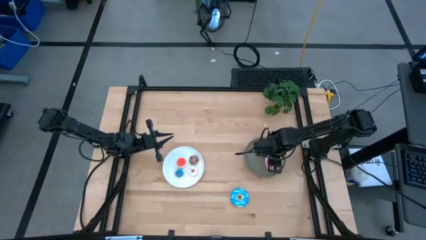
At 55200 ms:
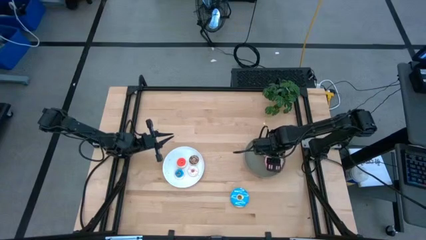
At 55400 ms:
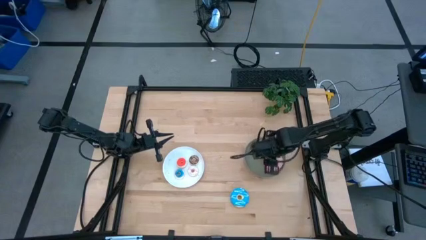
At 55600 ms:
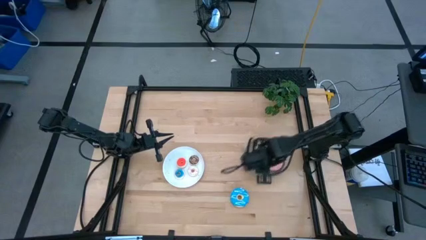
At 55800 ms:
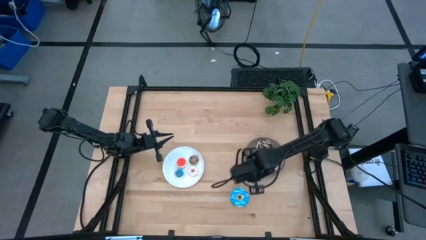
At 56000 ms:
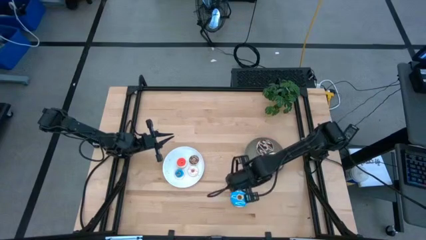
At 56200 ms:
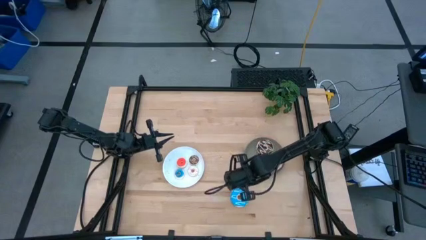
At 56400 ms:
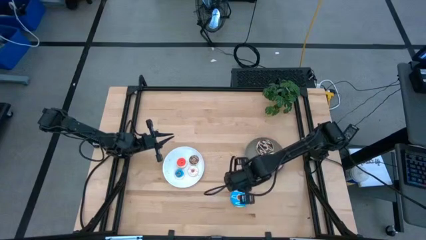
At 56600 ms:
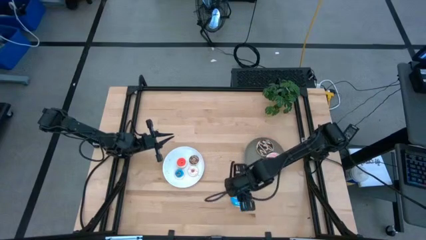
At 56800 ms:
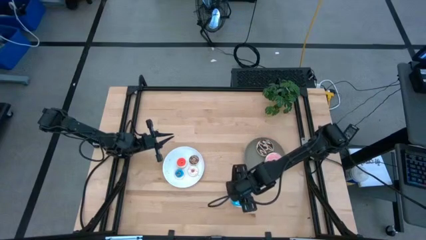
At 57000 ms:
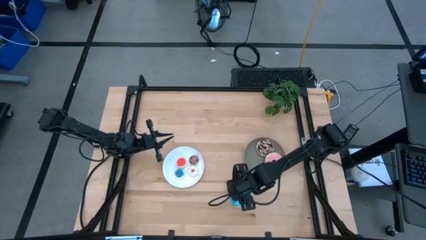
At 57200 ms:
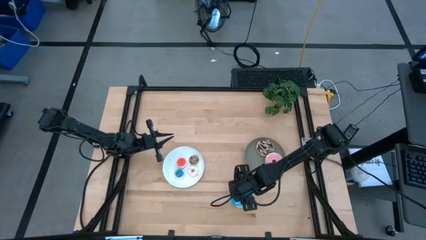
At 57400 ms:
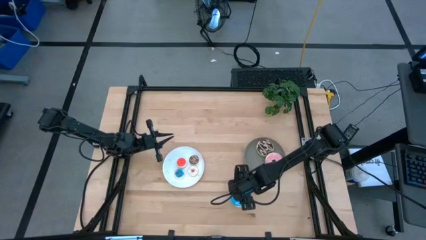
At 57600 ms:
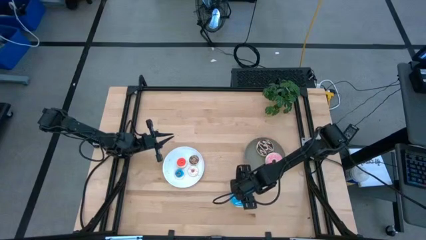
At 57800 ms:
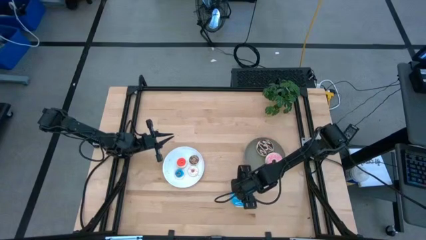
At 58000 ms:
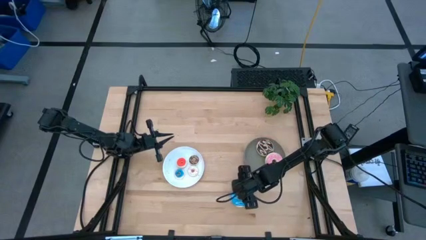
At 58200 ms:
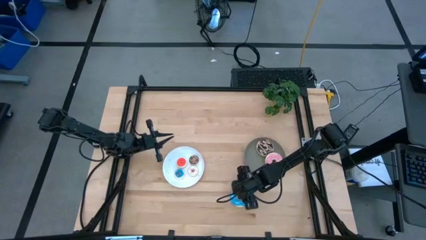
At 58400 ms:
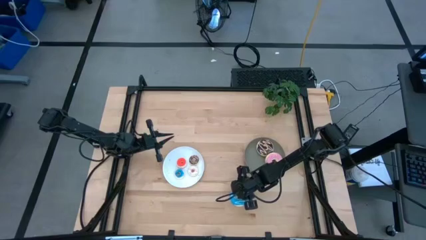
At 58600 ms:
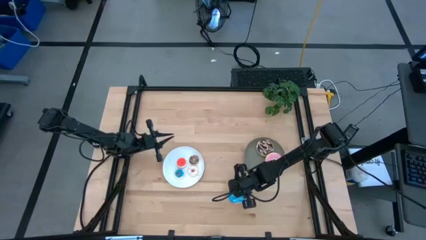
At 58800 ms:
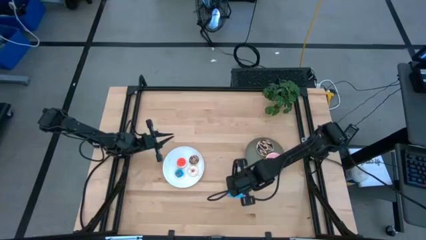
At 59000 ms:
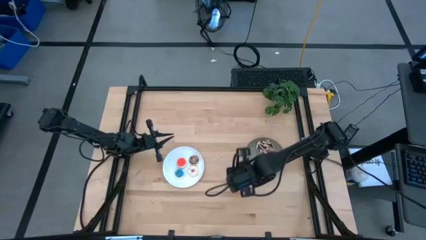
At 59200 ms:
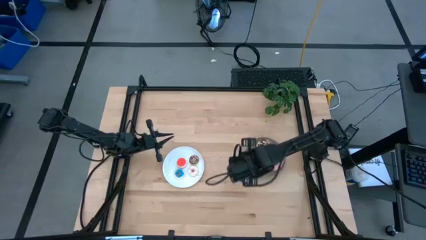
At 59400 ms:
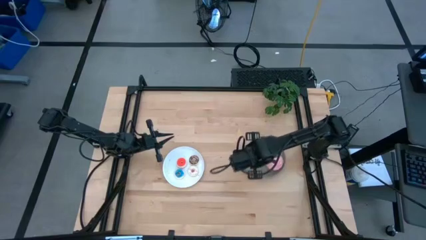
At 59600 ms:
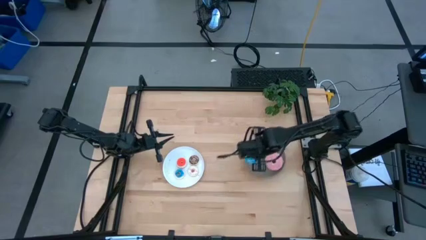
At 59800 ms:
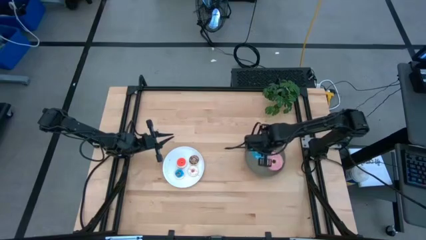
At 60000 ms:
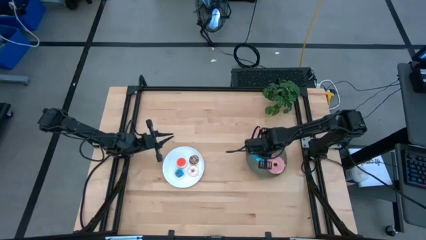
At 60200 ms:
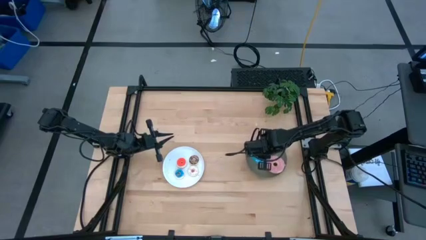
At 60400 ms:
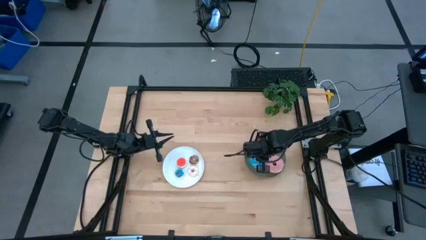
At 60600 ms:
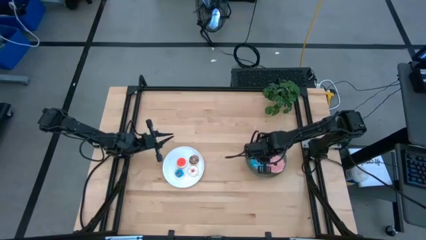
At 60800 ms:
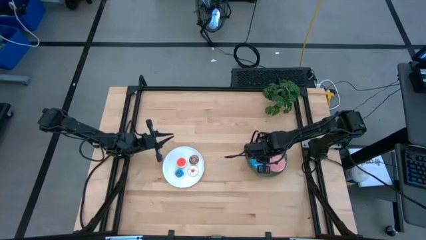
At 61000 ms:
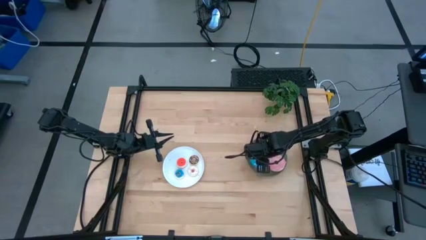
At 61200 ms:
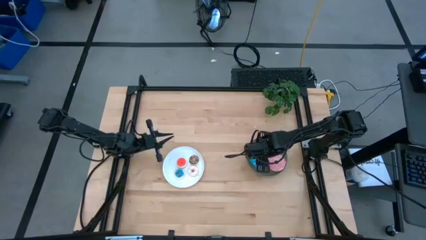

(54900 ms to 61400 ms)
Task: Pick & Place donuts
Put the big blue donut on the gray plate

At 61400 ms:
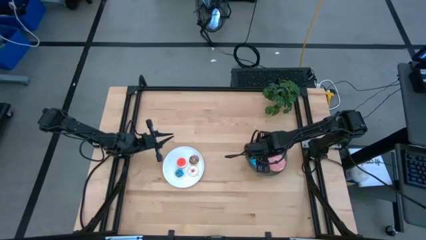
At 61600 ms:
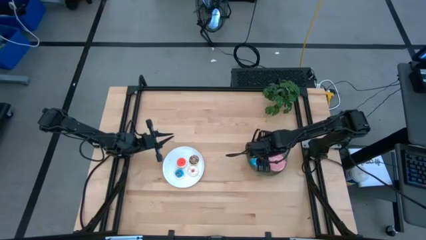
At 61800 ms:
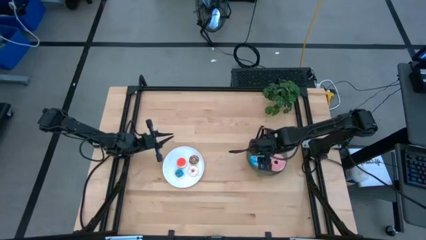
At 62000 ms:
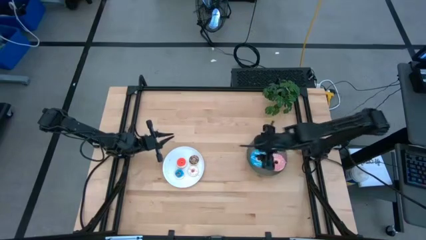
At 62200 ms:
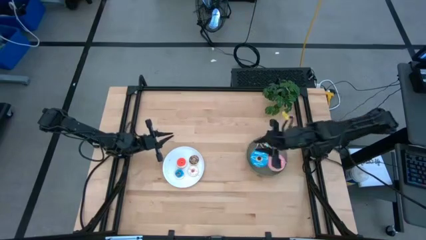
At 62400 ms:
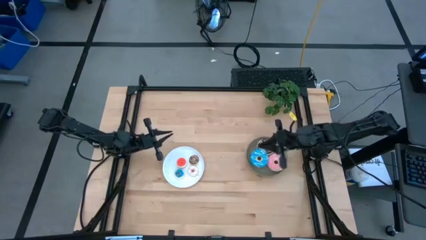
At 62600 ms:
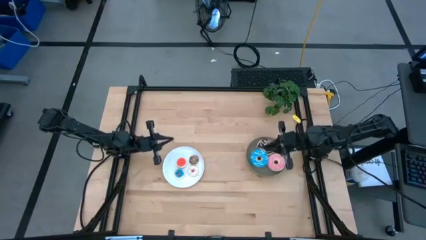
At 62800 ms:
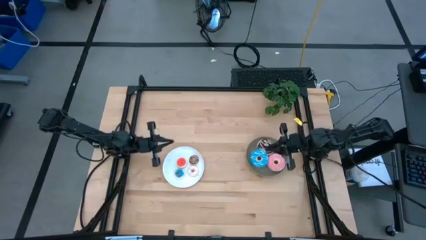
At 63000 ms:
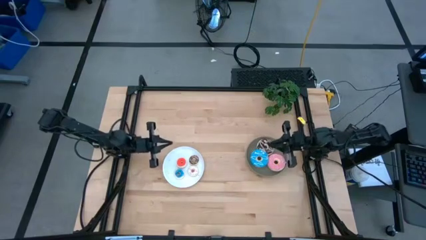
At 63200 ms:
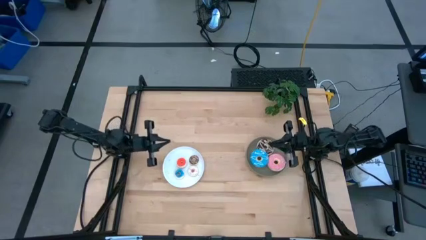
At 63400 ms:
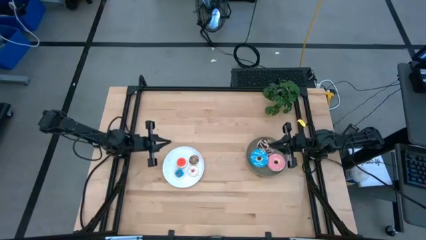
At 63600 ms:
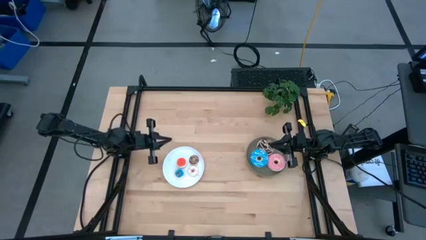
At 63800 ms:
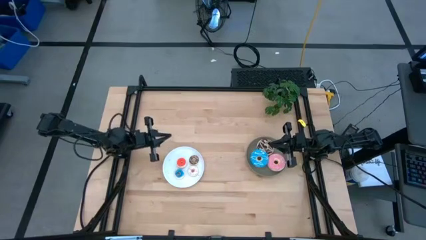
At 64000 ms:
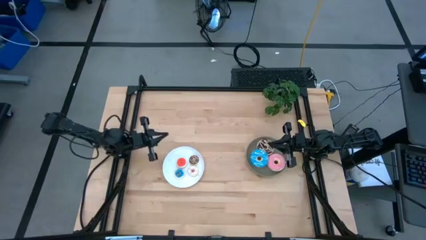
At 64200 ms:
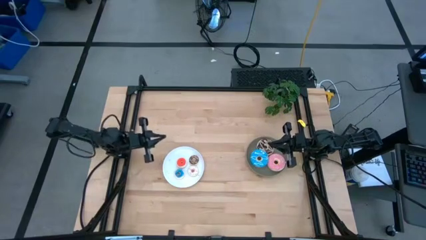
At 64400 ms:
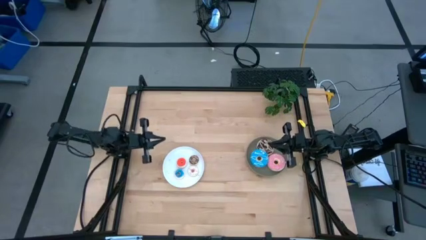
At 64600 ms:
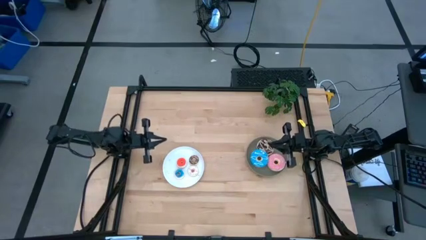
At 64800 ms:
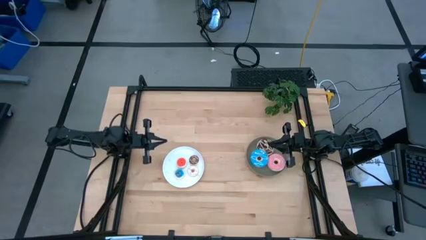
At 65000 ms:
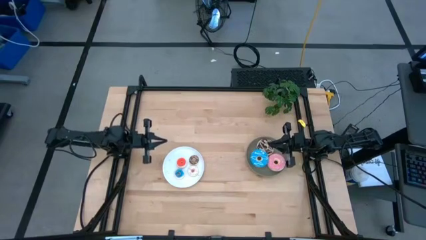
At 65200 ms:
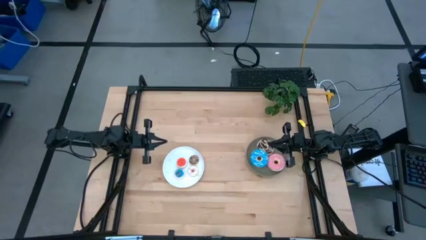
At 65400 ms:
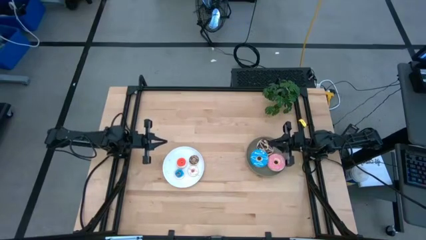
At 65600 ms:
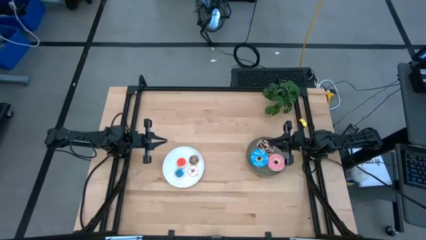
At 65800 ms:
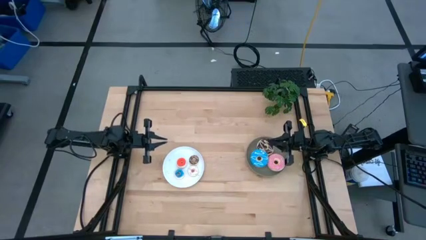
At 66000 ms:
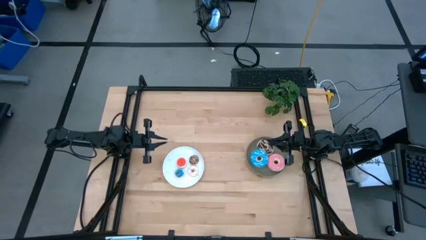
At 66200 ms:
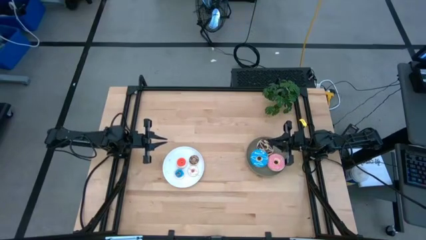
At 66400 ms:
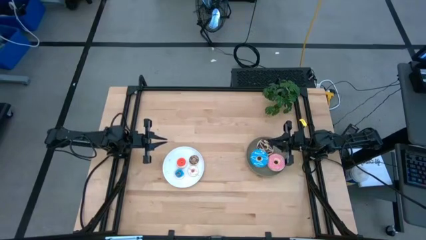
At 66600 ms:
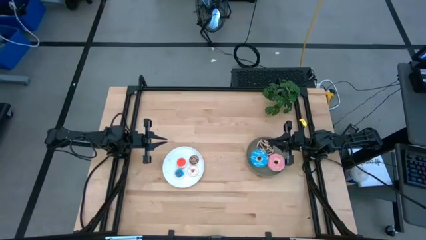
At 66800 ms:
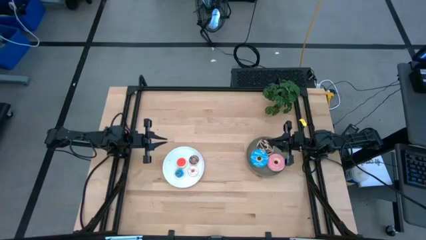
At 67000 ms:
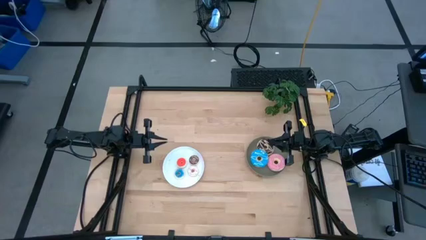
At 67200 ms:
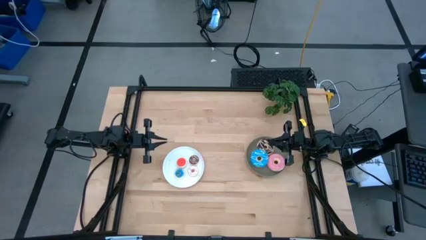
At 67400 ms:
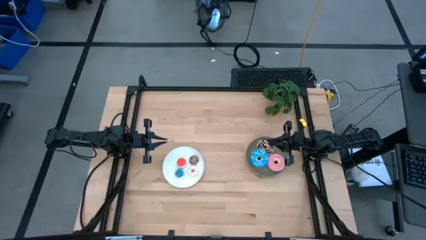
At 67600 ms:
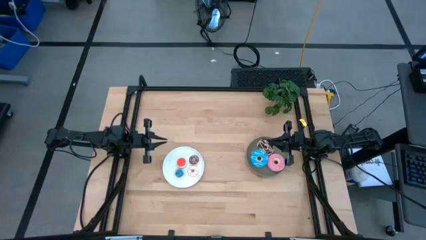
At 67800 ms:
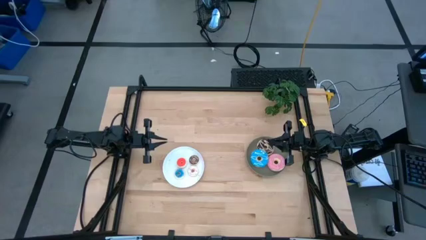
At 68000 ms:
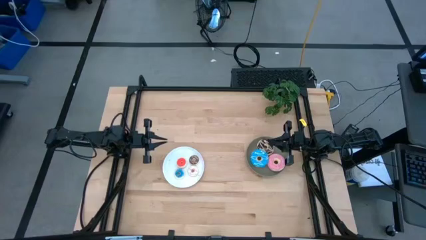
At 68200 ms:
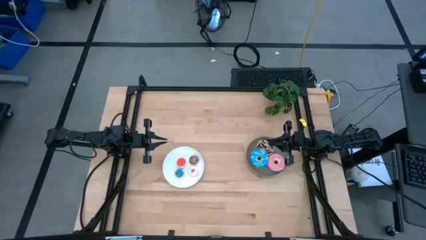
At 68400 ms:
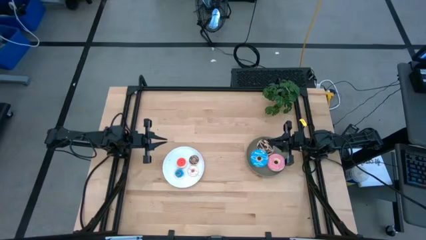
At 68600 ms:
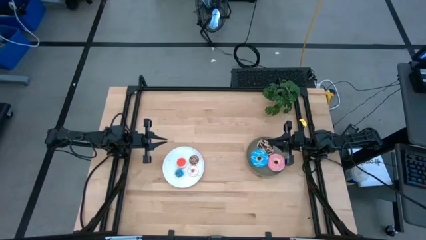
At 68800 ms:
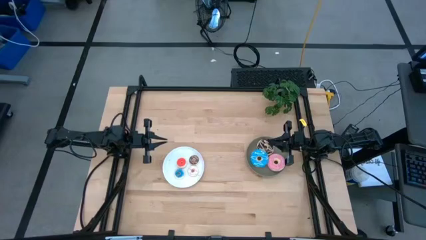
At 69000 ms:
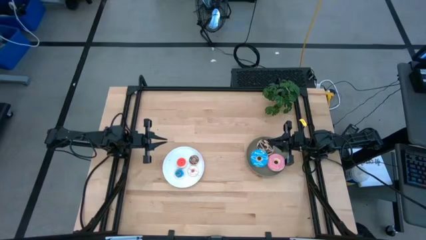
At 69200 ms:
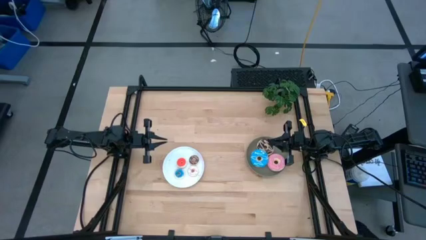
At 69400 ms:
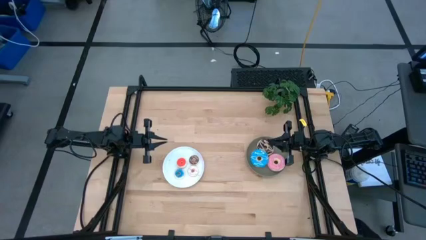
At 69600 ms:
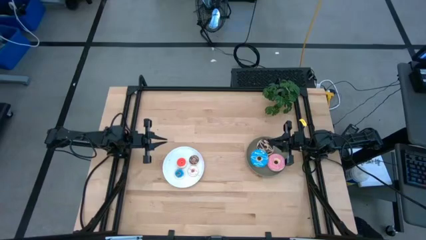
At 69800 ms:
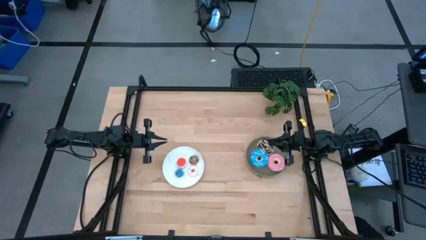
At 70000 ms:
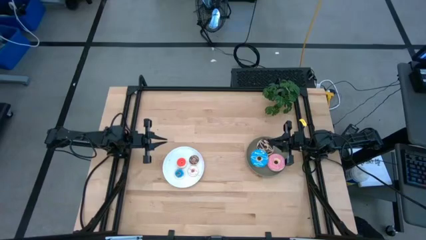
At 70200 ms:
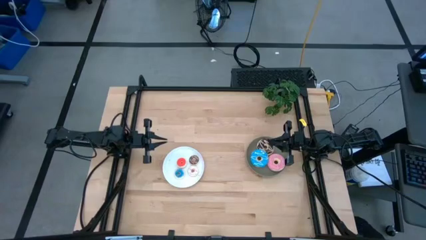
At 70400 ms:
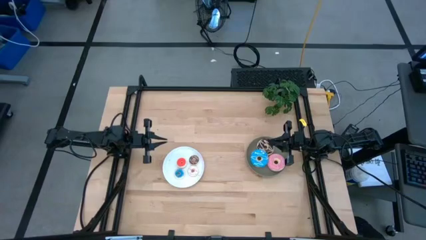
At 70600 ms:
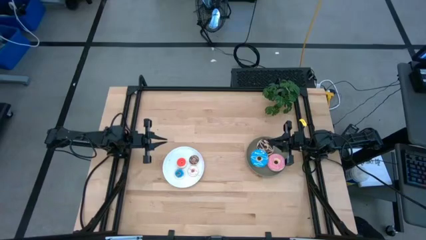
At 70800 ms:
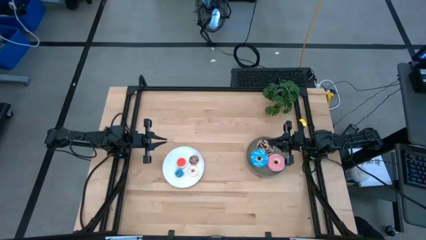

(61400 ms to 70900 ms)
Return to Home Position
